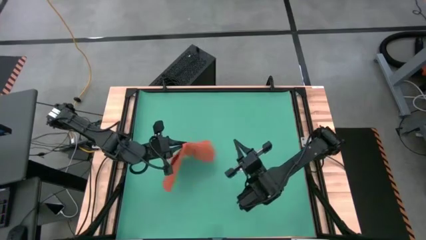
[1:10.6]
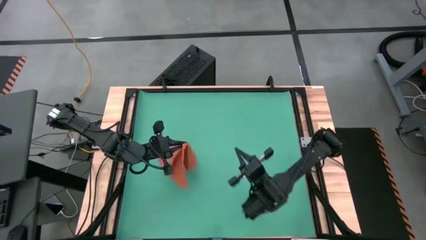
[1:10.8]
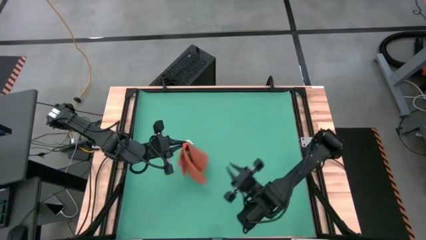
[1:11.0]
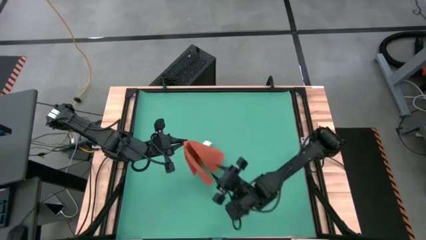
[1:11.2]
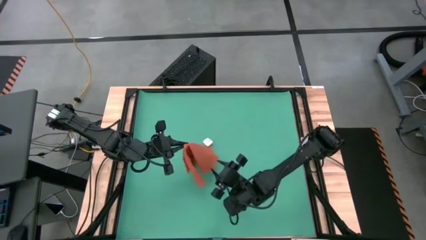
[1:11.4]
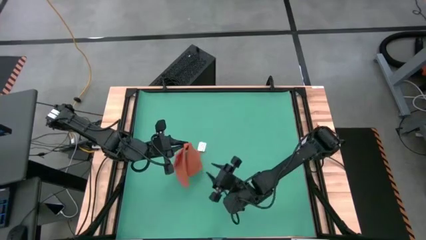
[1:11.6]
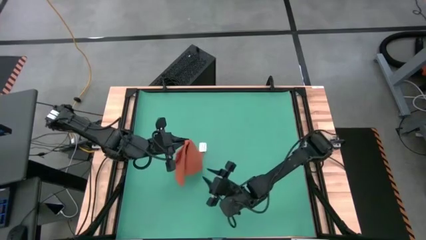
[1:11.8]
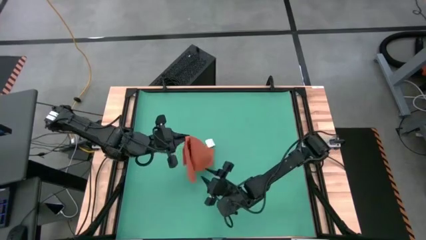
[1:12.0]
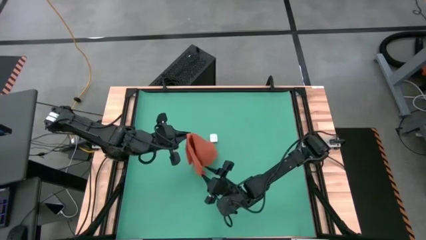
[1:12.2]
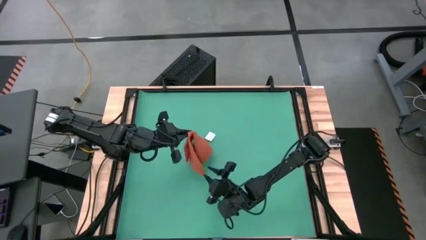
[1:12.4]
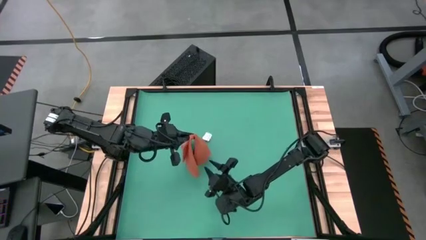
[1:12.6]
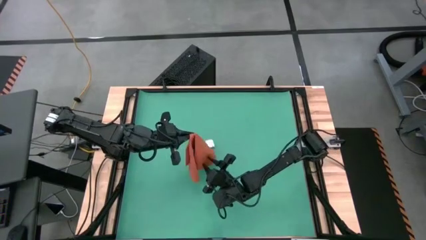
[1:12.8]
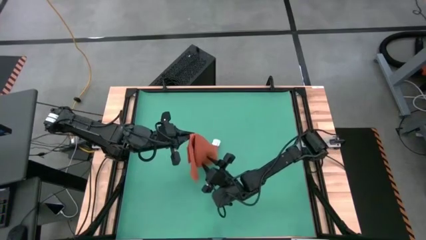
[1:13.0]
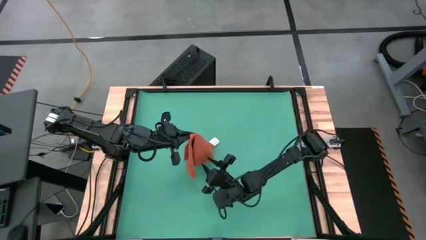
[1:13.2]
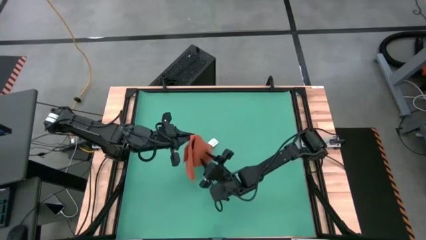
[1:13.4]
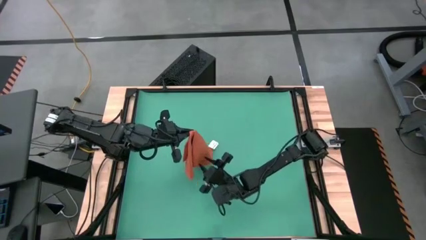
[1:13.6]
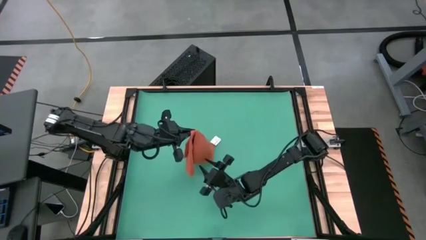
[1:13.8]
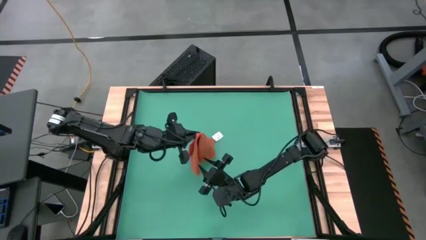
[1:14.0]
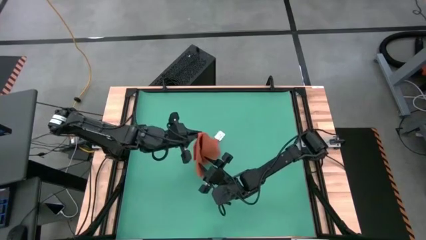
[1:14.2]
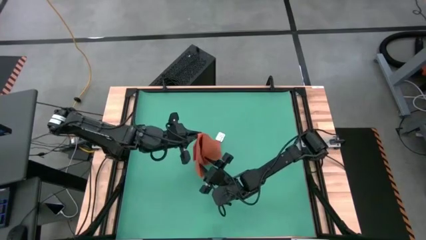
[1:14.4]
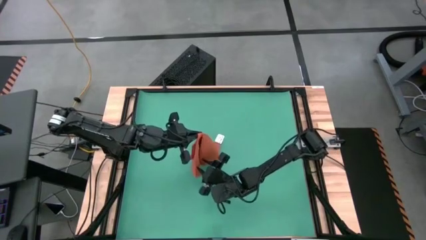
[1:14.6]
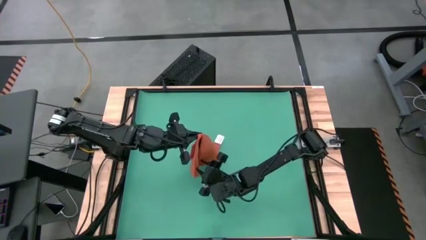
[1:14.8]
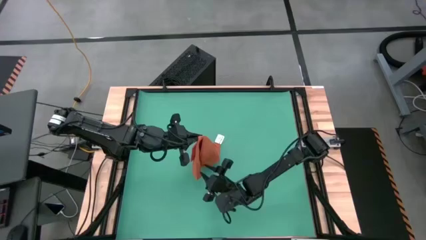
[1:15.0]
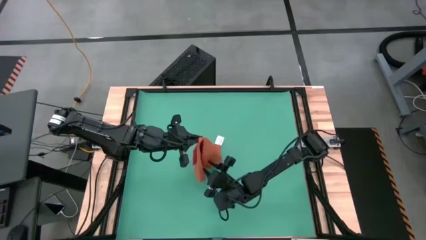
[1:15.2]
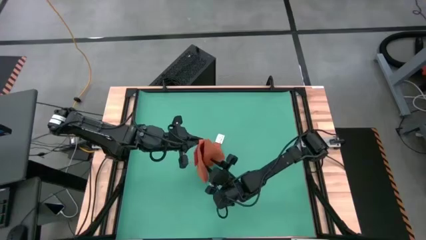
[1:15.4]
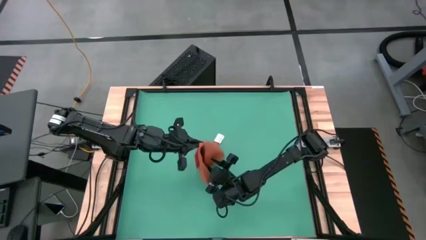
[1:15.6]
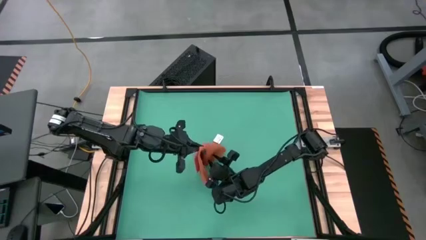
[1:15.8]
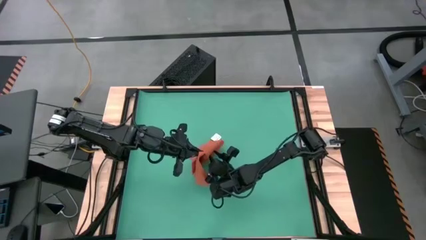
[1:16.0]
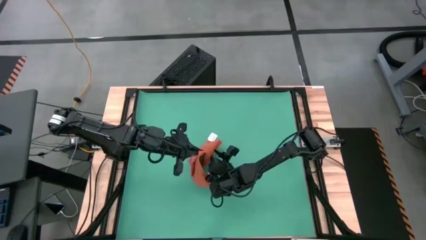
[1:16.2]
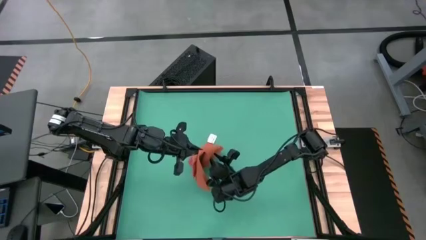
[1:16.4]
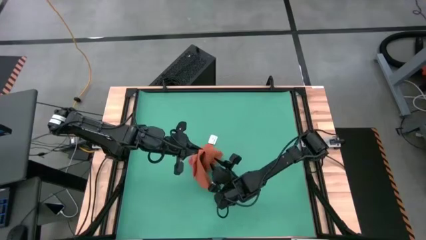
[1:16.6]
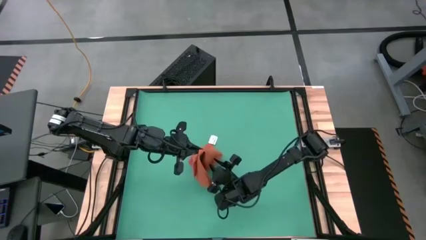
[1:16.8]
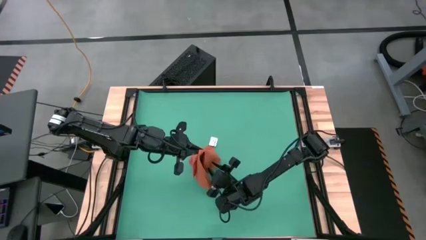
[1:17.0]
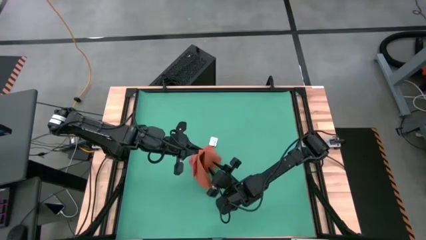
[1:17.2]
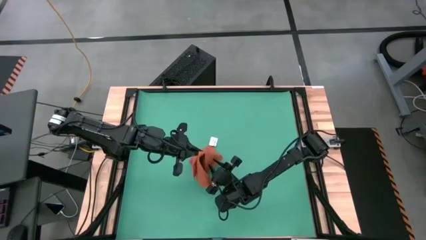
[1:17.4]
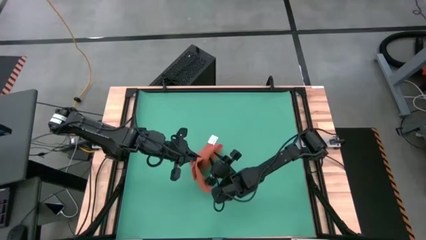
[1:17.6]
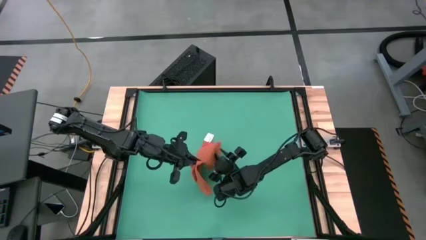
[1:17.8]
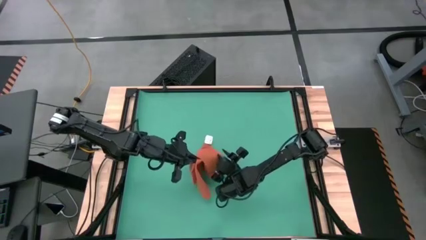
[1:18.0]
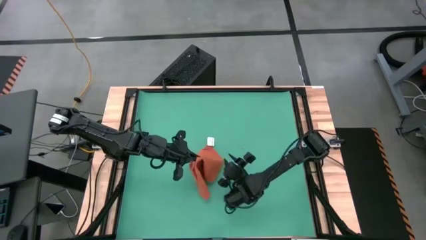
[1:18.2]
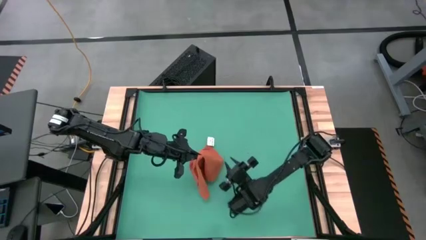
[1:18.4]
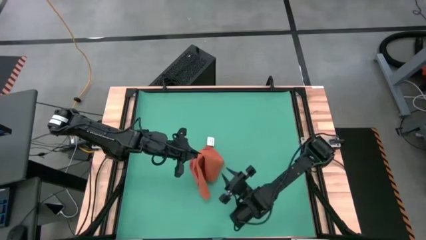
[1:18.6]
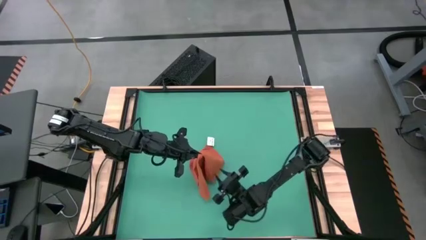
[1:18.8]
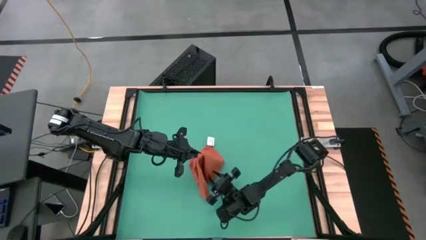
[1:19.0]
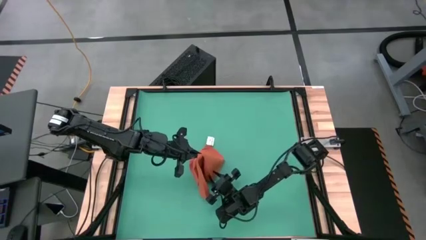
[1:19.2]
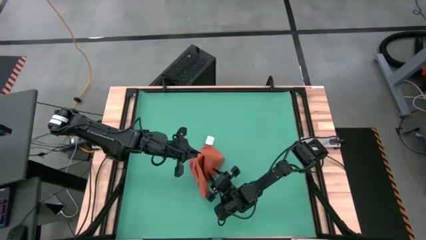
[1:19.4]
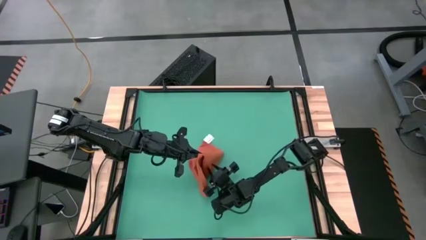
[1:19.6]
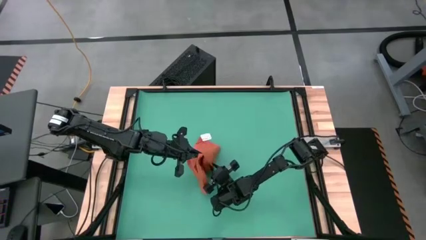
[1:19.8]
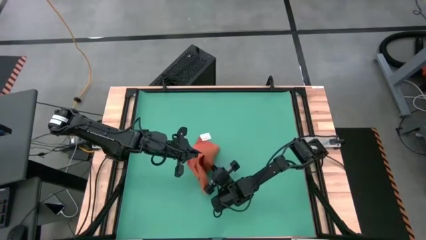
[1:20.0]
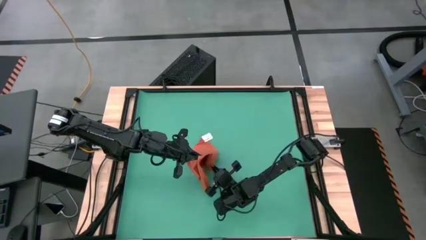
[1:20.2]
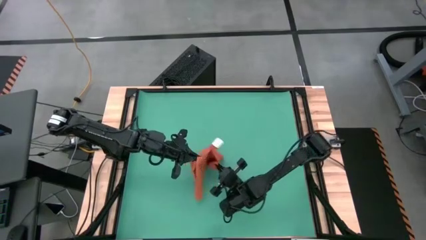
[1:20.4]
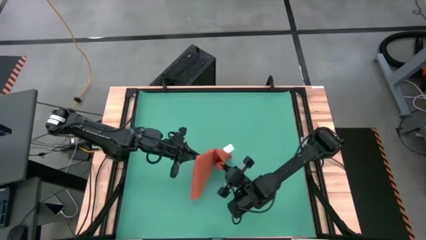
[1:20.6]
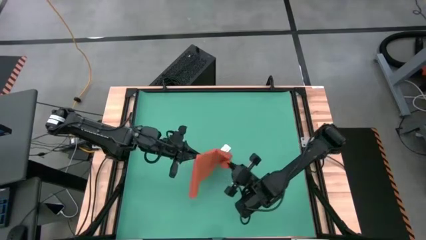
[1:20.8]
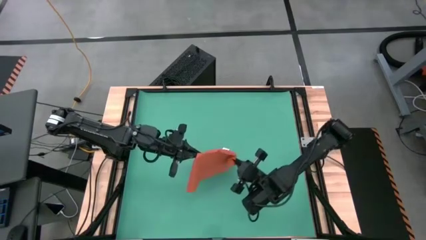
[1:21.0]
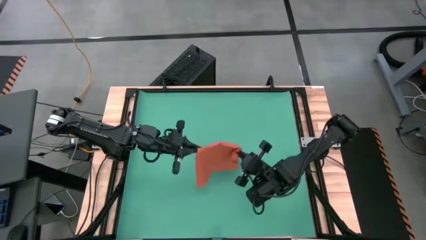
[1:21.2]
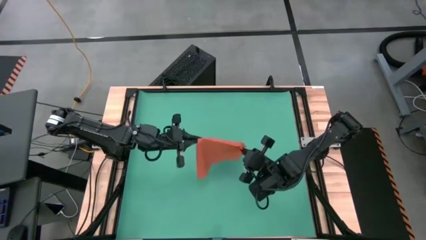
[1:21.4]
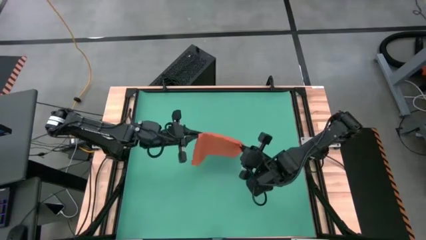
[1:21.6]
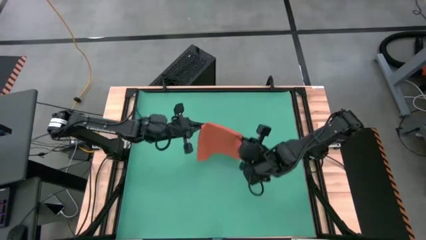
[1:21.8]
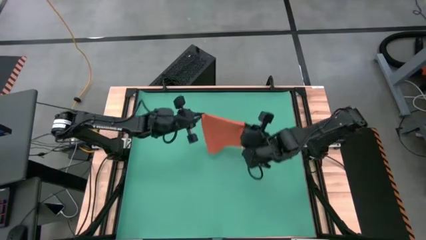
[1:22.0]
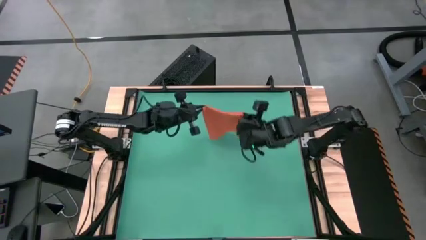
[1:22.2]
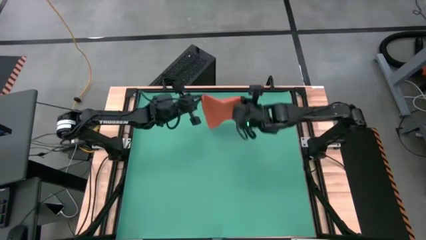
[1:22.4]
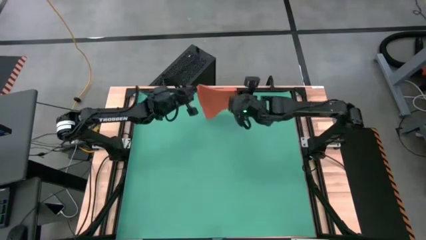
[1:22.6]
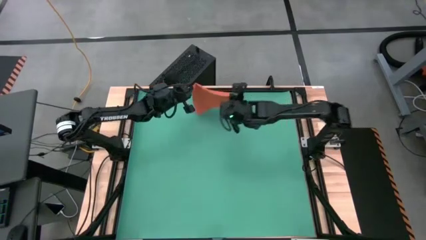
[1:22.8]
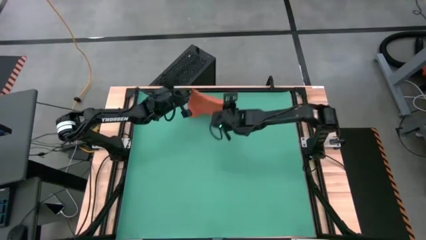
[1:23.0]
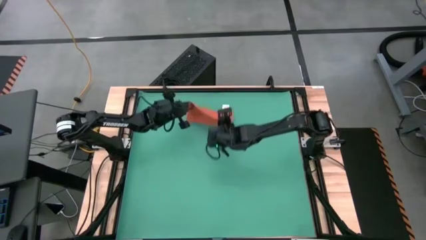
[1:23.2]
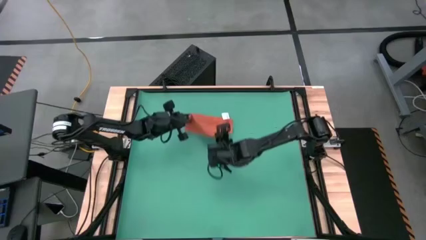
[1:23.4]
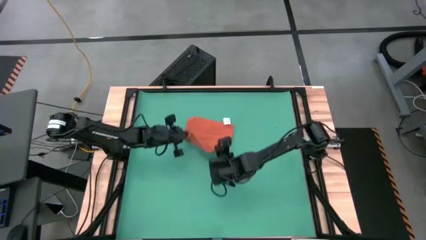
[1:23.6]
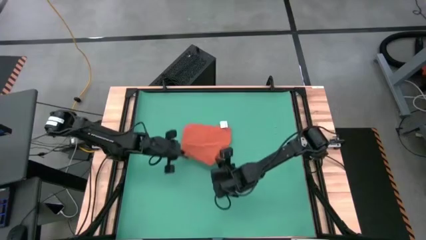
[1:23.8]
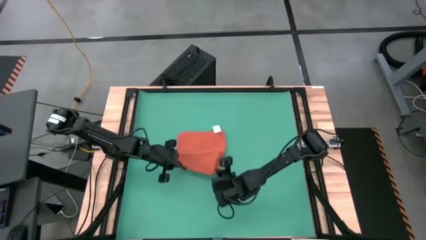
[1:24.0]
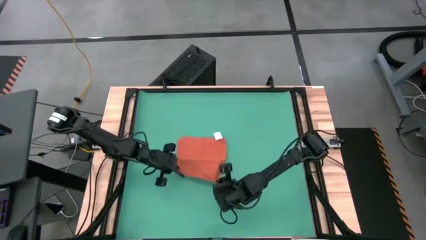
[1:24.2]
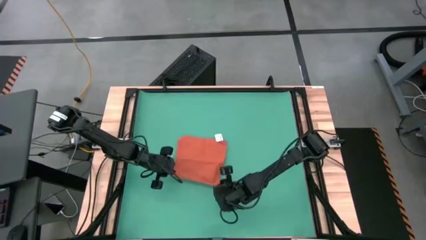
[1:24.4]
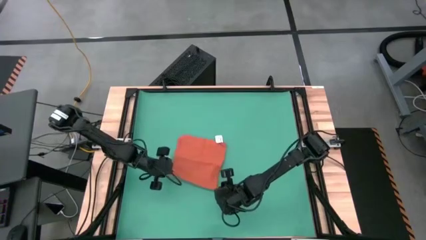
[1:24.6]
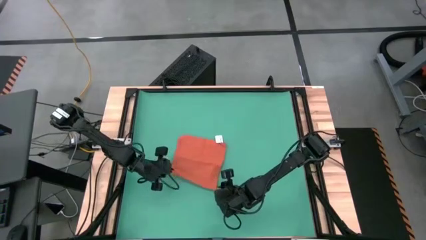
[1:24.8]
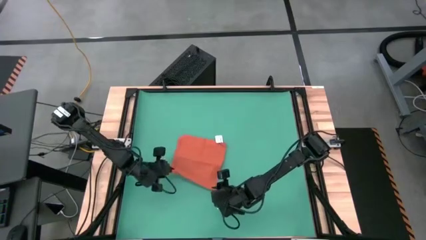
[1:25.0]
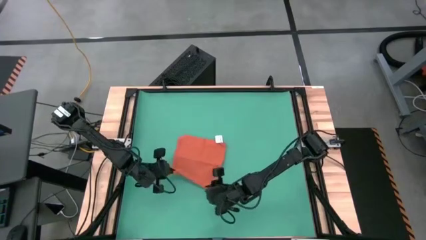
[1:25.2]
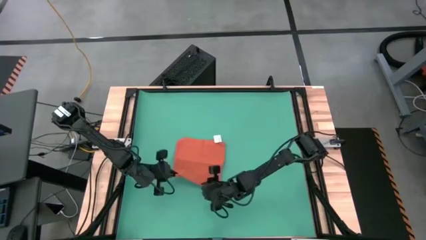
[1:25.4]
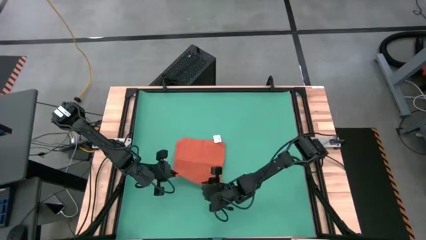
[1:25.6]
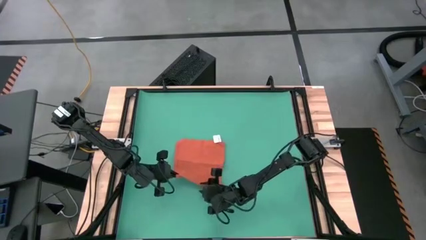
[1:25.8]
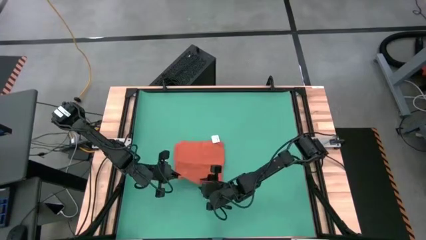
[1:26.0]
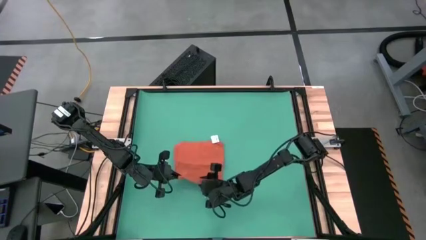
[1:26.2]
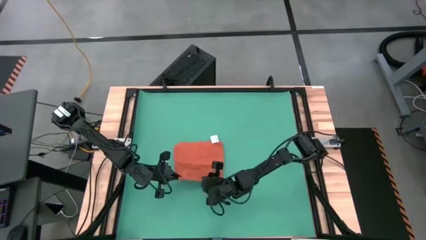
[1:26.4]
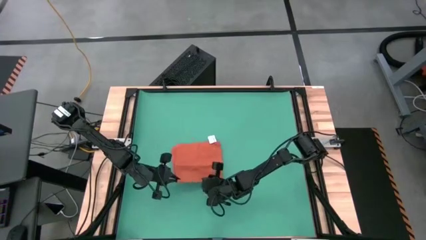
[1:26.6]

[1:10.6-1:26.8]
Task: Roll napkin
Fold the orange table napkin
